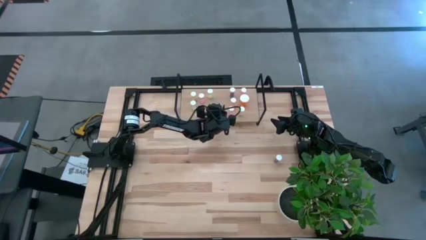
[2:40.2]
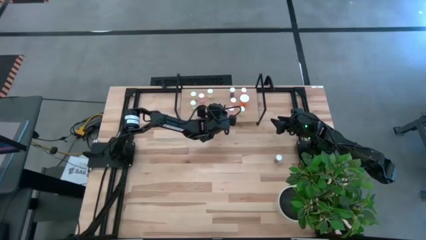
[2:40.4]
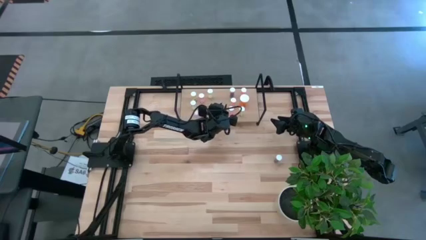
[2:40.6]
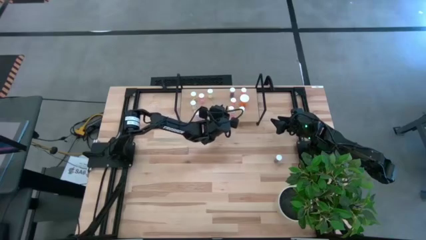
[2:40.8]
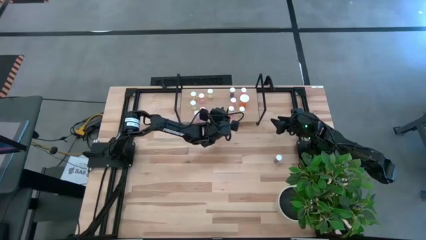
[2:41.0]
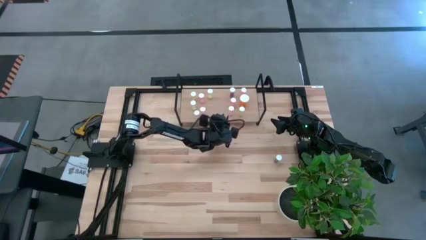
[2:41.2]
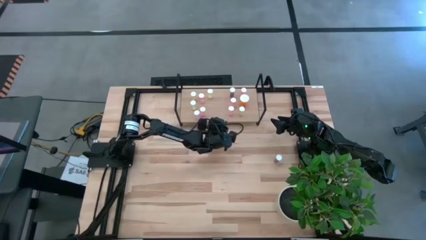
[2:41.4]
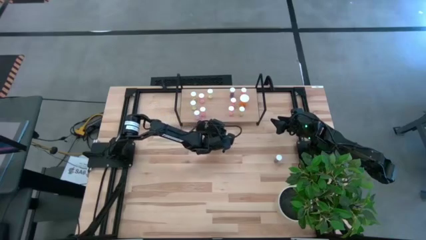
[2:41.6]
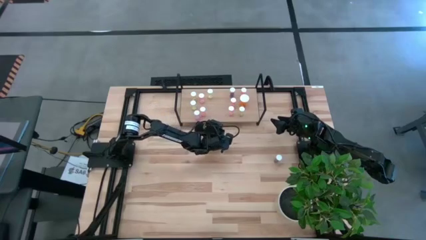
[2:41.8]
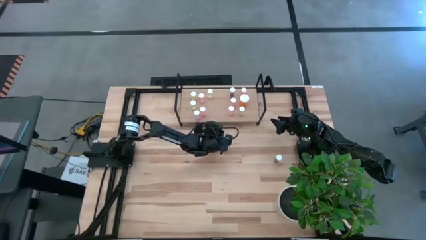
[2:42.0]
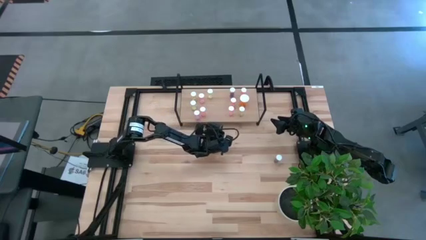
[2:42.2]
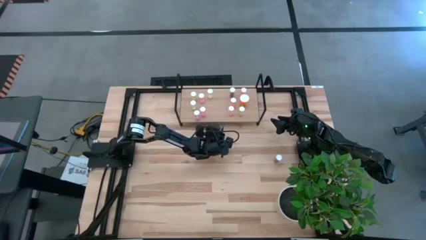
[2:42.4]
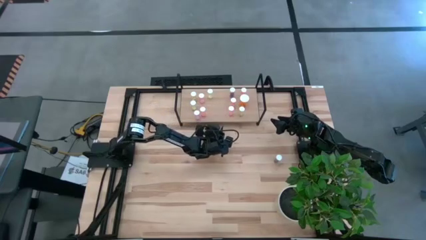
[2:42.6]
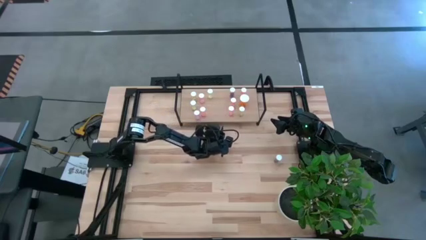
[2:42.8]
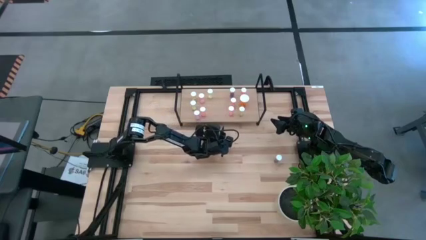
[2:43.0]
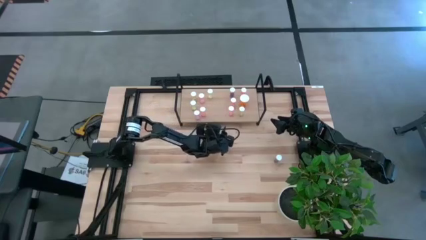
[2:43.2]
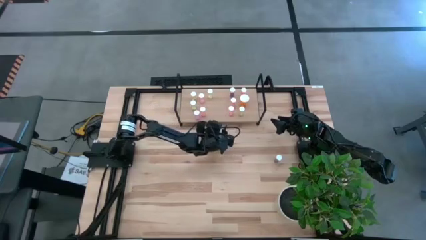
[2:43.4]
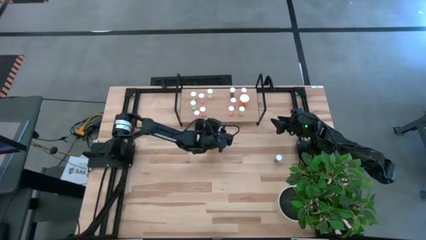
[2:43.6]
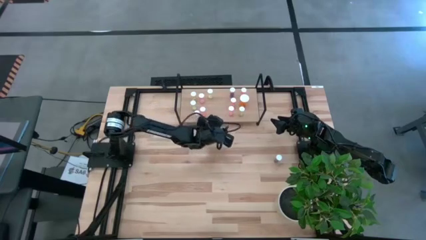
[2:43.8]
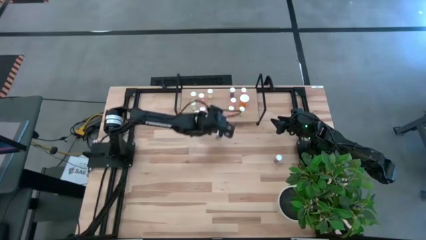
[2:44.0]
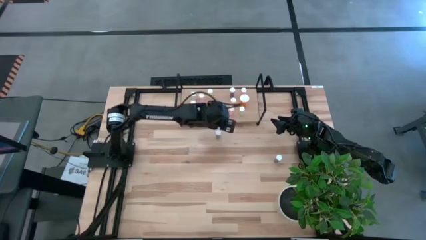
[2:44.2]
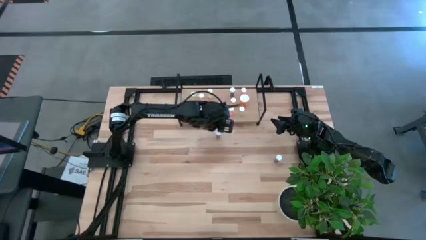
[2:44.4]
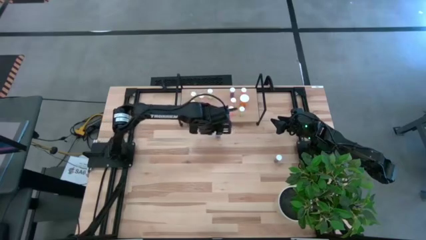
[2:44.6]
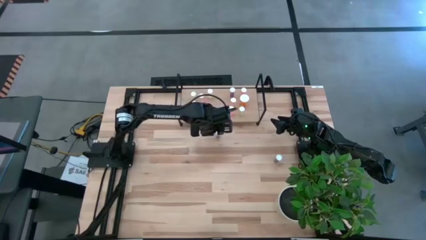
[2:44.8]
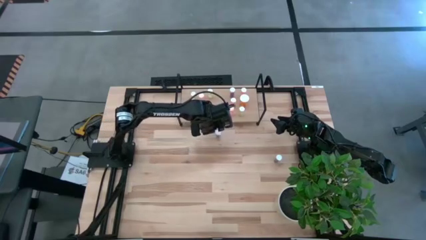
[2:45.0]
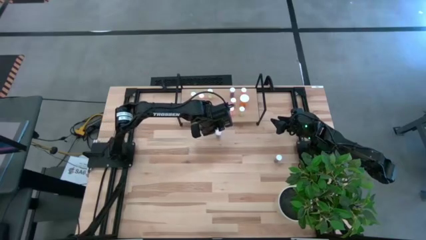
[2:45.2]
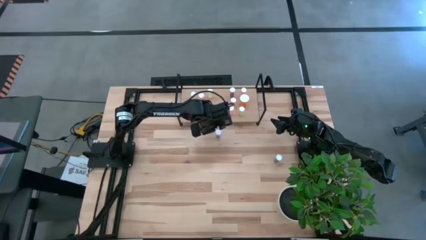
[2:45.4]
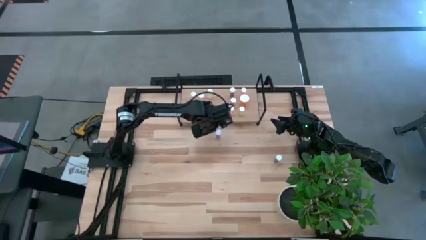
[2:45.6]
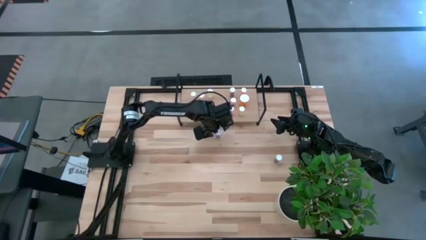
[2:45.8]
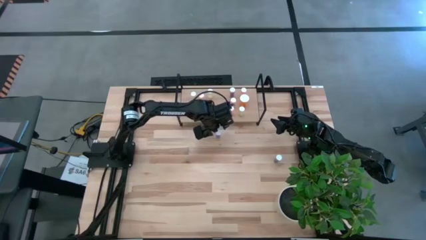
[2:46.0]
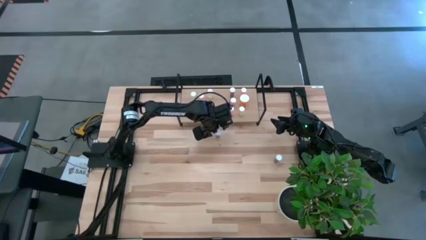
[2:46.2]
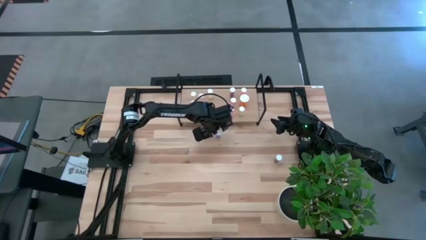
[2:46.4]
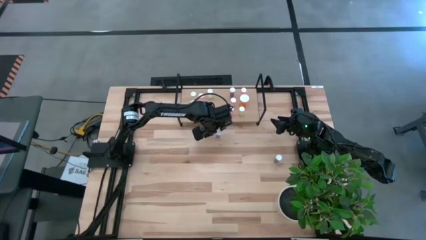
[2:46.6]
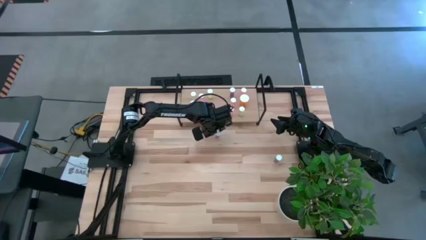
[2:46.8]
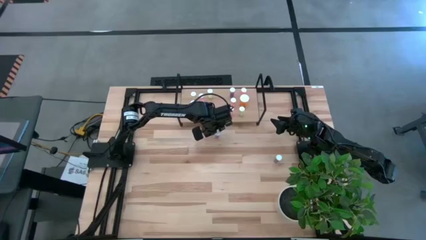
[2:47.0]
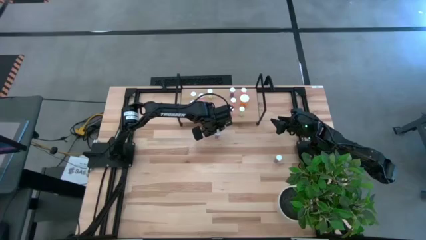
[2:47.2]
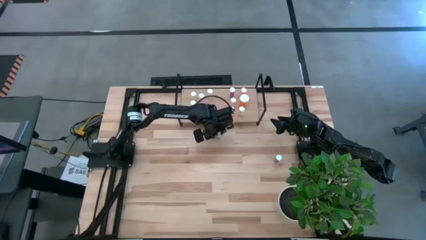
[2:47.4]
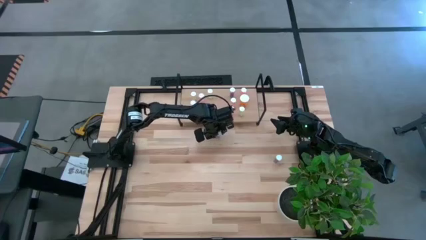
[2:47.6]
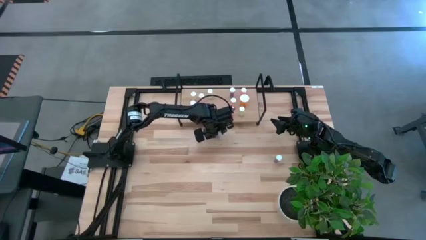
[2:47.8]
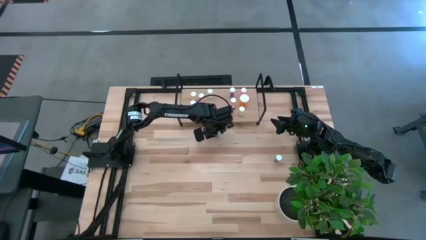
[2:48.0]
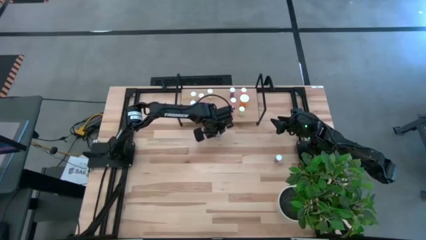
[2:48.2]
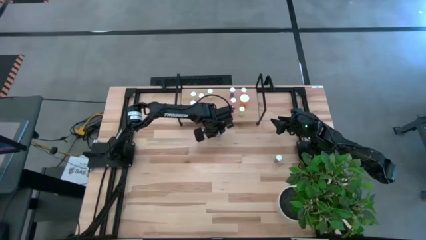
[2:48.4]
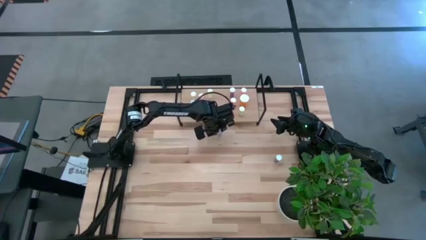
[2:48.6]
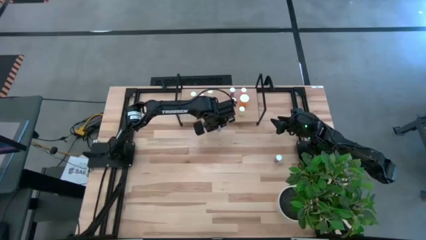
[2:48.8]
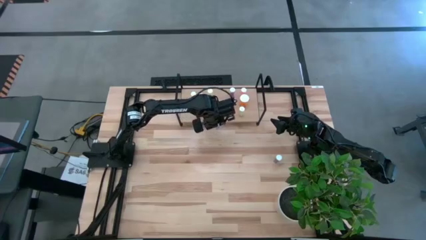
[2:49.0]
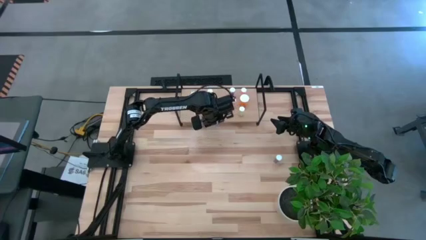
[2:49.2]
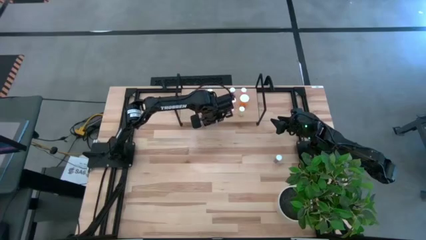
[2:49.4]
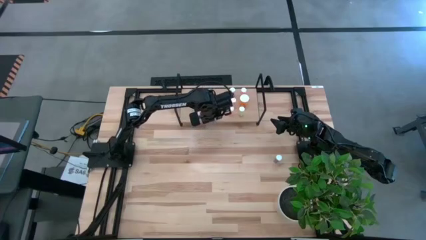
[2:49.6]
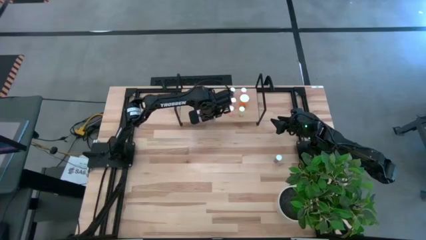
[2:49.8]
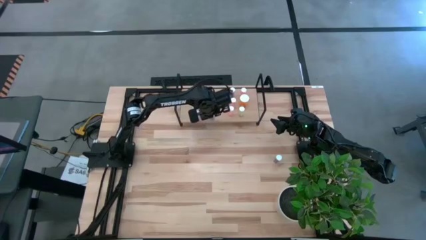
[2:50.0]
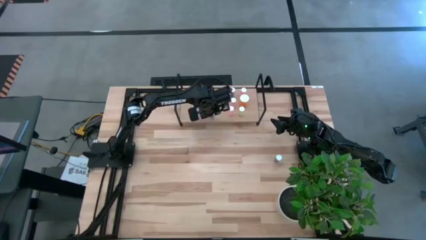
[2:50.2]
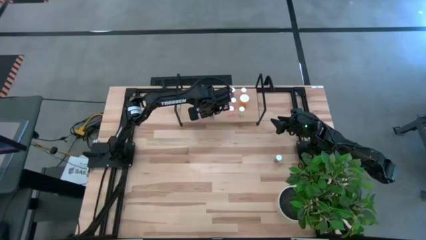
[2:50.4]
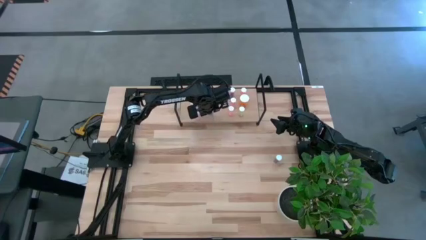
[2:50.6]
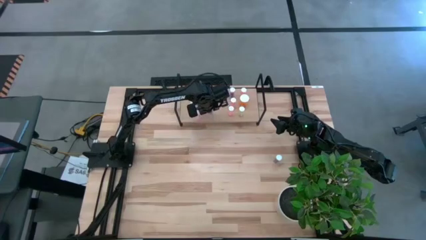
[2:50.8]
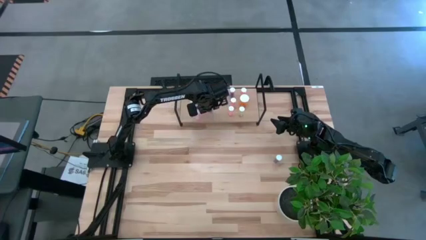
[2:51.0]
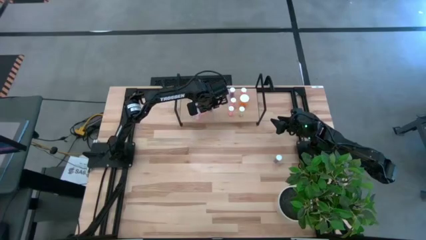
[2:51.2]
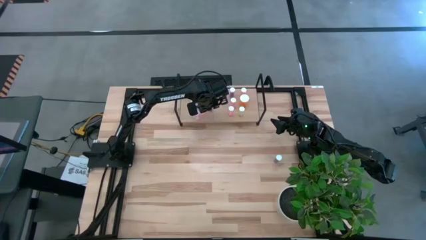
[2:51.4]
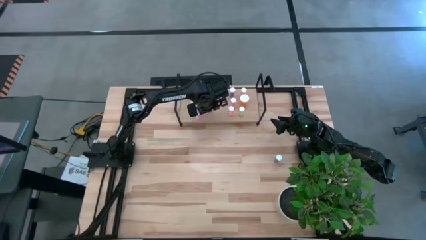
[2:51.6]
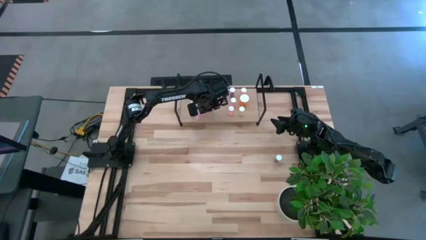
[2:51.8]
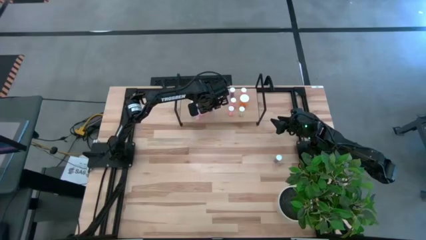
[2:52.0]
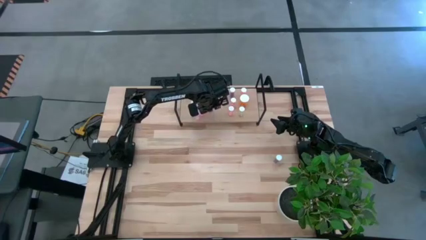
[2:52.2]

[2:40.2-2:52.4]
Task: Pick and place medicine bottles onto shelf by color
Put the blue pill bottle on the shelf

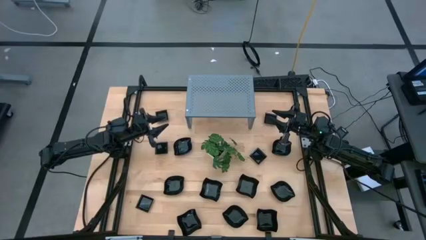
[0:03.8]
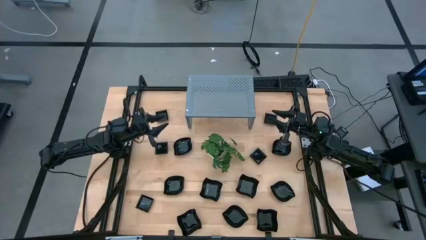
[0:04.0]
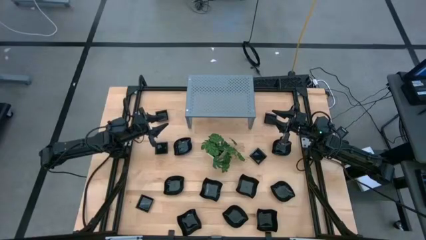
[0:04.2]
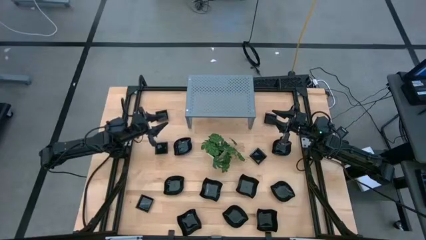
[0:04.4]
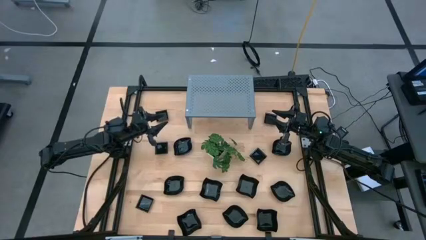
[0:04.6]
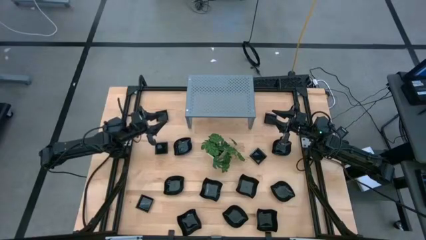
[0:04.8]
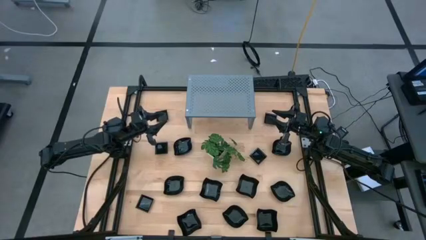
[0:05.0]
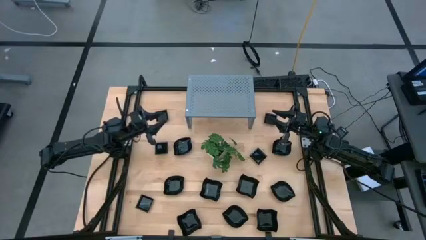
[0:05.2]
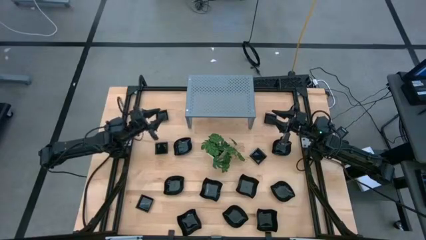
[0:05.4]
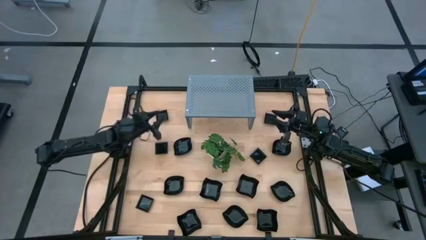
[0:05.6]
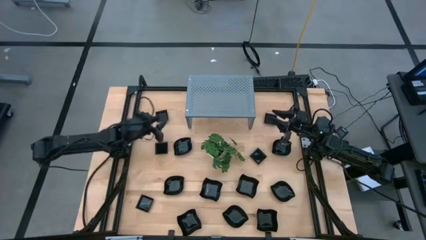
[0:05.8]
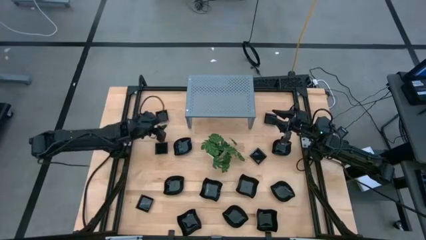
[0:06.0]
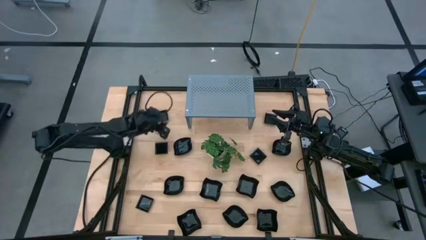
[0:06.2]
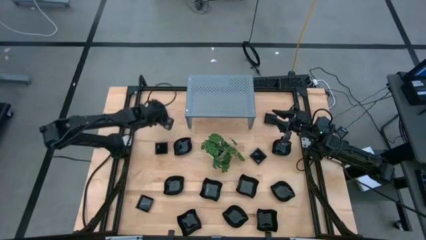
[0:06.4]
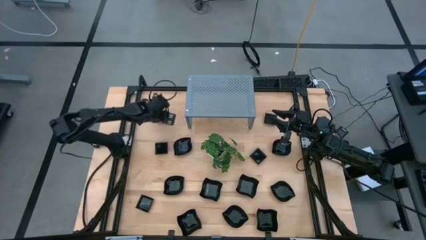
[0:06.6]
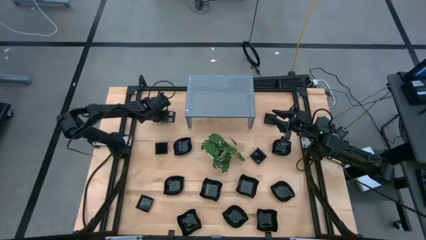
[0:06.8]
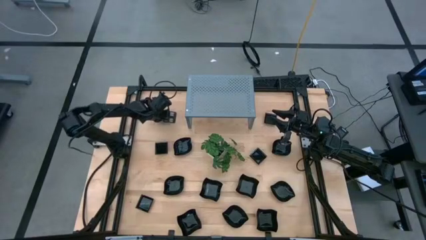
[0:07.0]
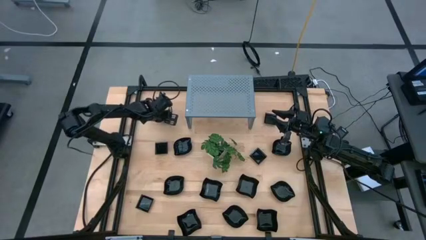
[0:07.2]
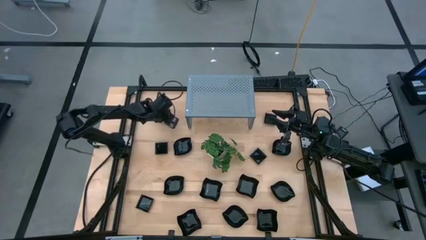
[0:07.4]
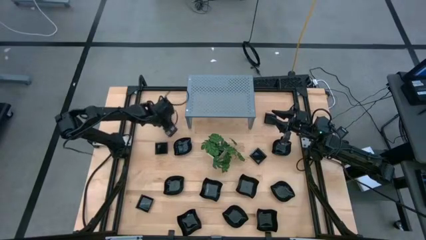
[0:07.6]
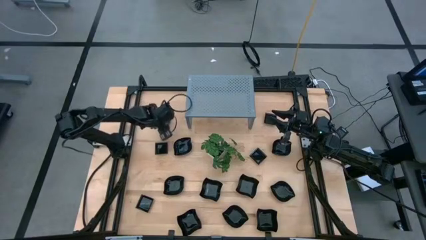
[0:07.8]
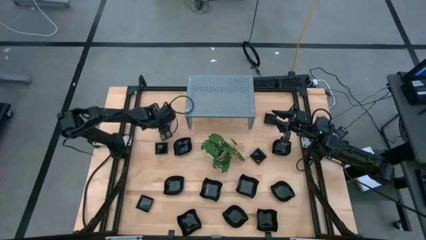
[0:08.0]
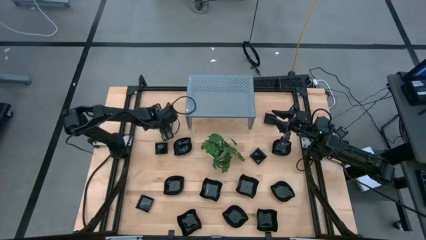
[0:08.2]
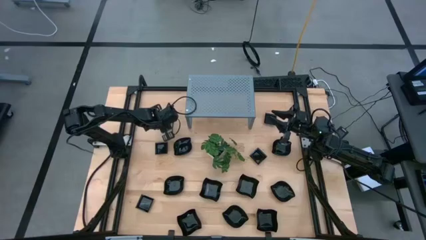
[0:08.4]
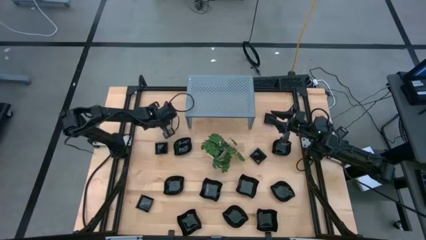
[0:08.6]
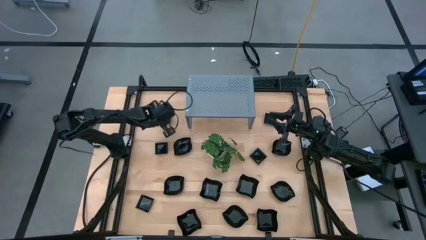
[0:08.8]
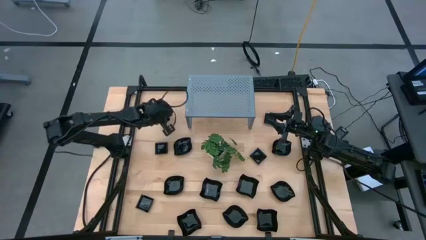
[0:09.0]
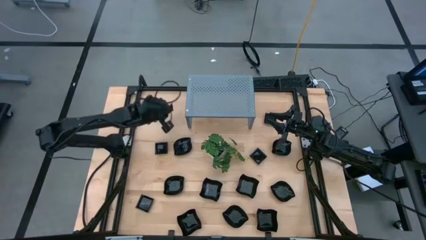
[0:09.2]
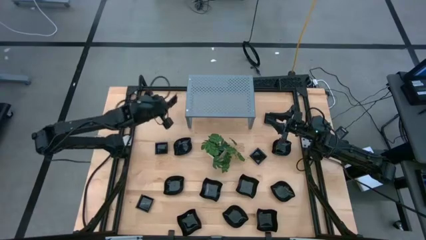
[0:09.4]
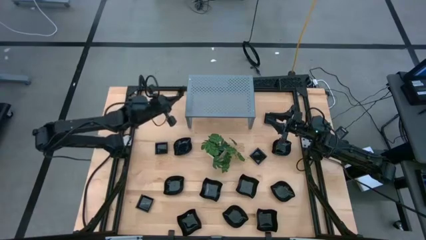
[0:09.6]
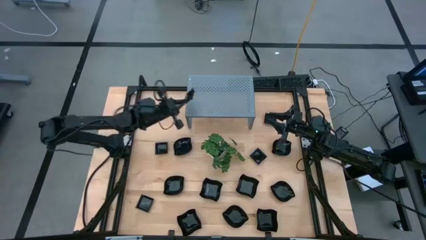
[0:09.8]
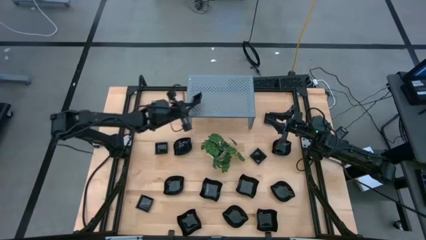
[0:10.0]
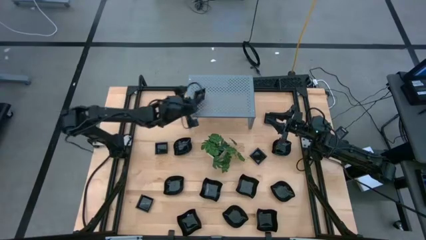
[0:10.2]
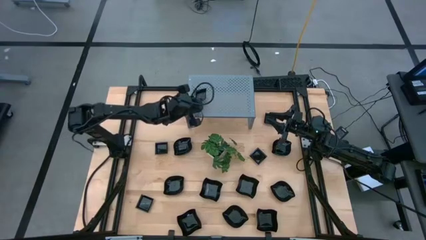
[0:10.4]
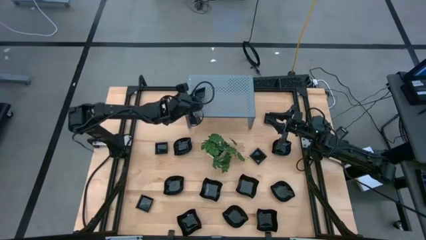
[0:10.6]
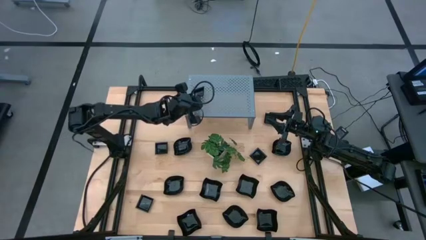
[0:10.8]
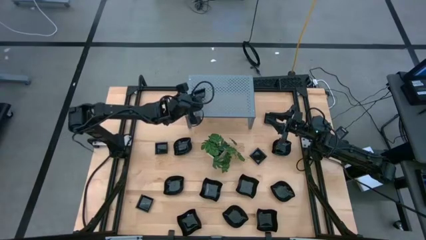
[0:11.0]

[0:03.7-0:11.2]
Task: Pick & Place Mini shaped plates
Put the black square plate on the shelf
